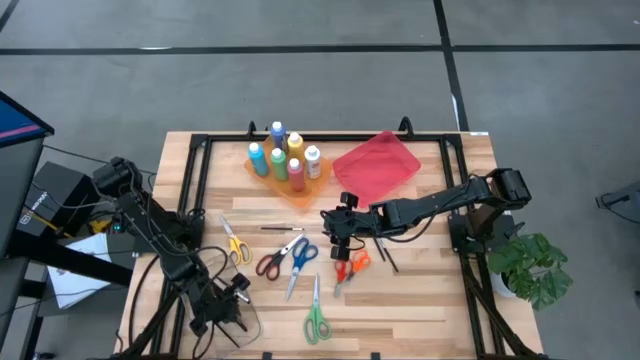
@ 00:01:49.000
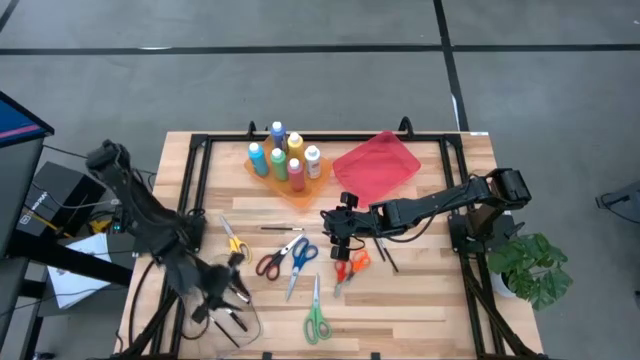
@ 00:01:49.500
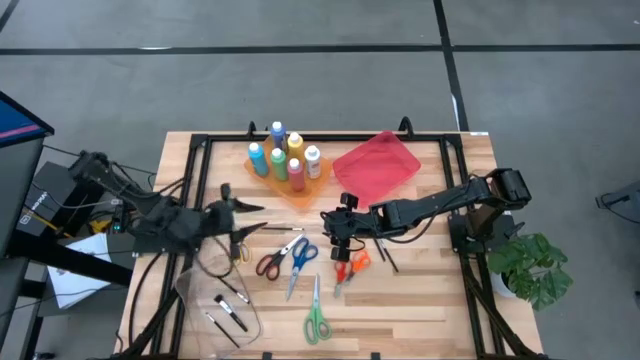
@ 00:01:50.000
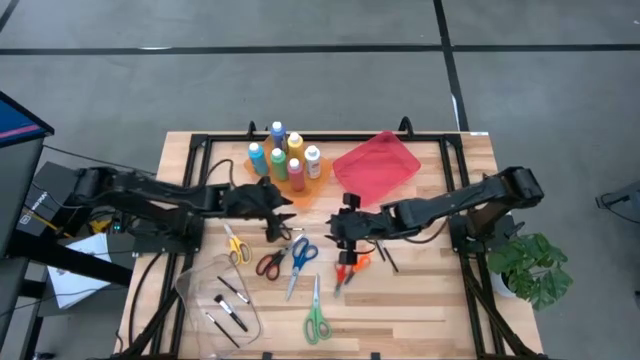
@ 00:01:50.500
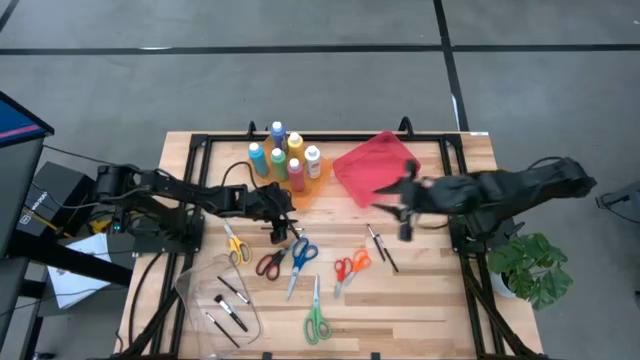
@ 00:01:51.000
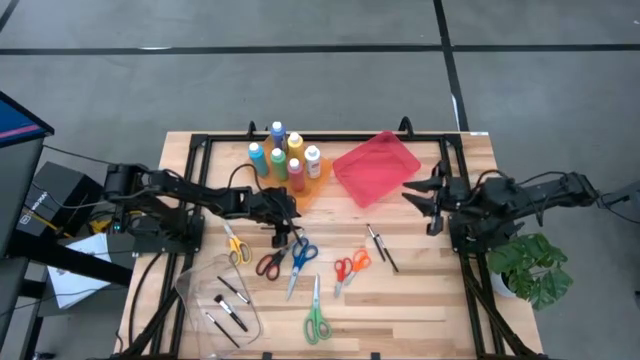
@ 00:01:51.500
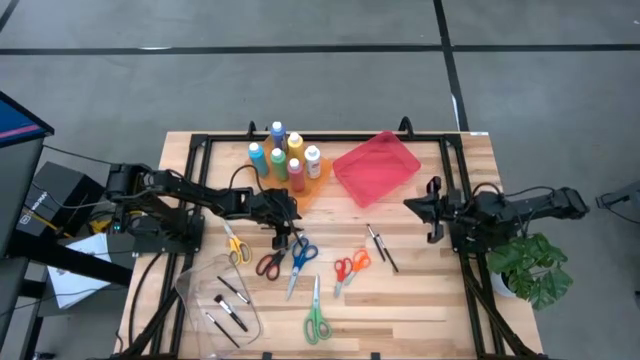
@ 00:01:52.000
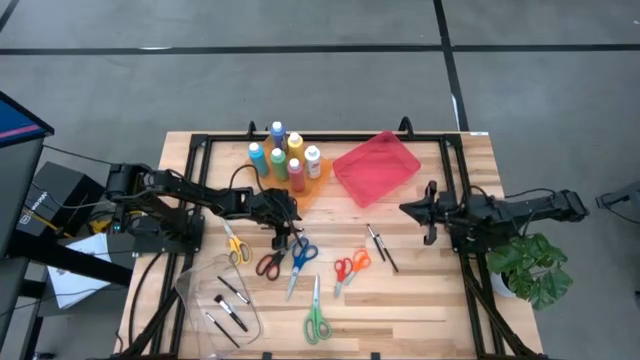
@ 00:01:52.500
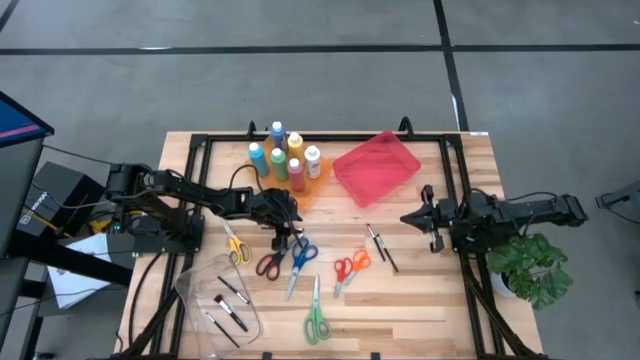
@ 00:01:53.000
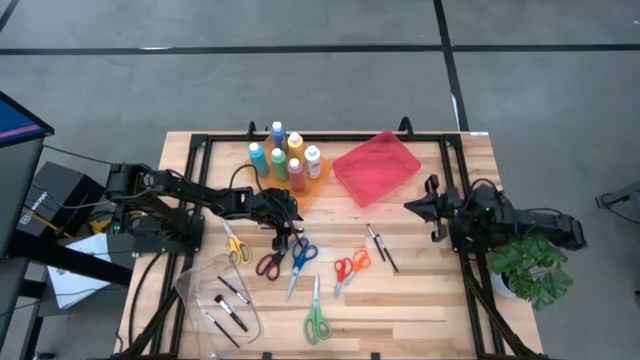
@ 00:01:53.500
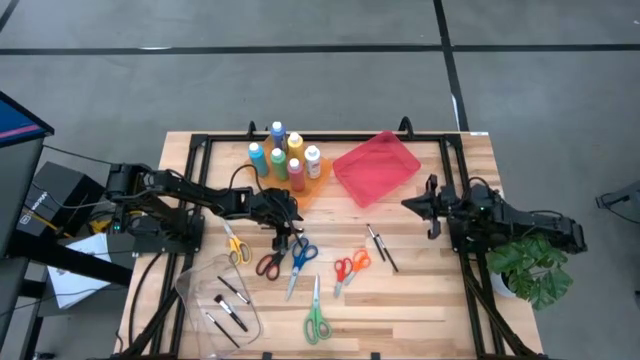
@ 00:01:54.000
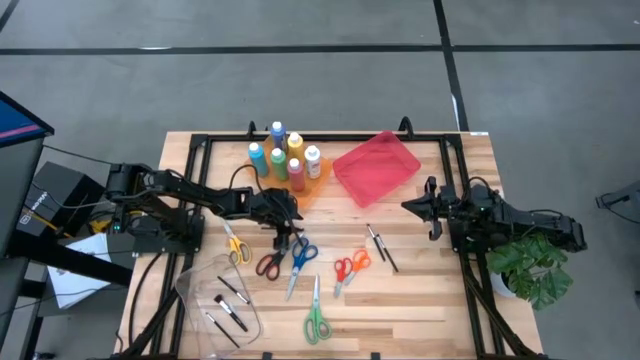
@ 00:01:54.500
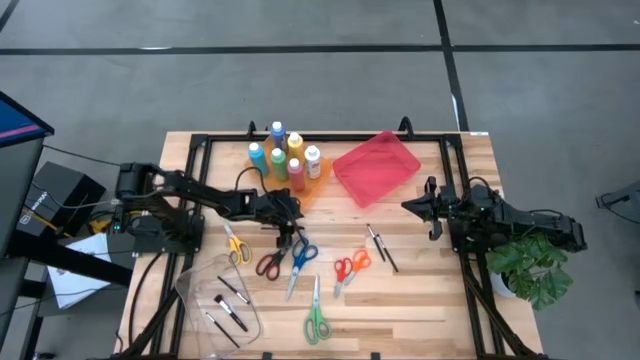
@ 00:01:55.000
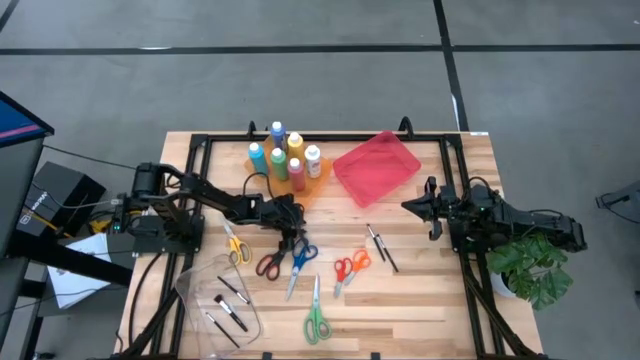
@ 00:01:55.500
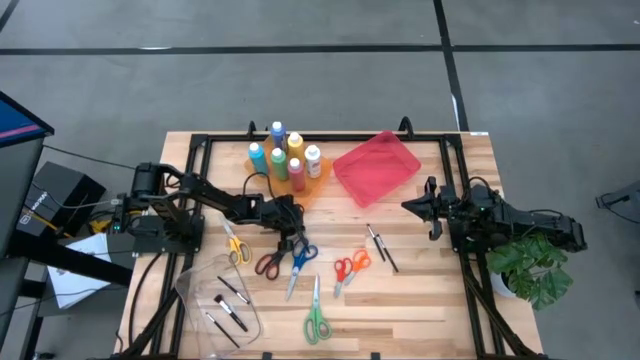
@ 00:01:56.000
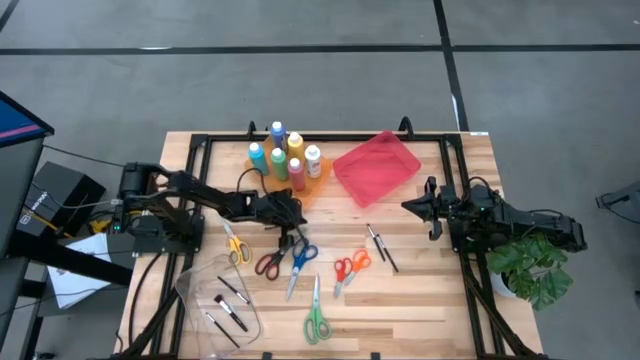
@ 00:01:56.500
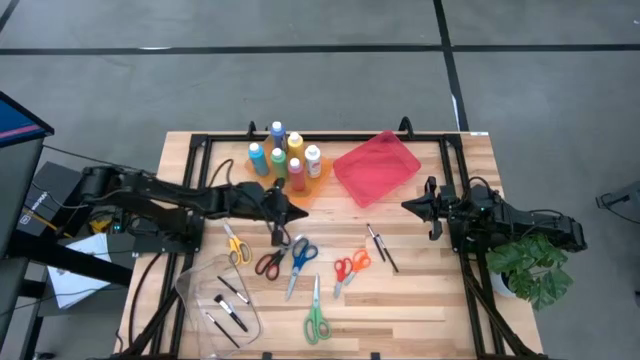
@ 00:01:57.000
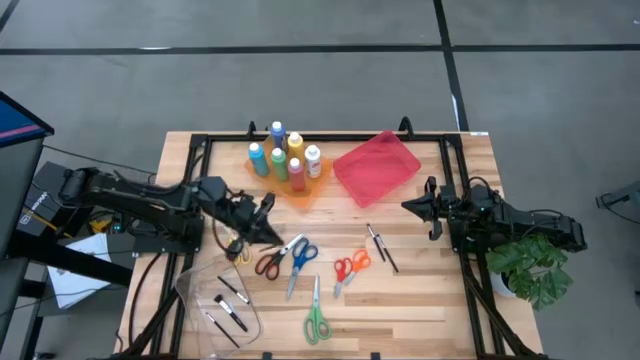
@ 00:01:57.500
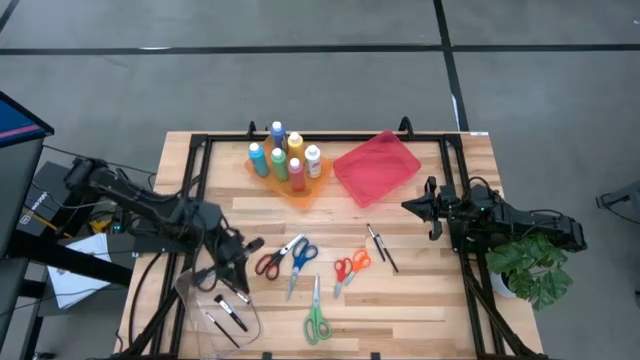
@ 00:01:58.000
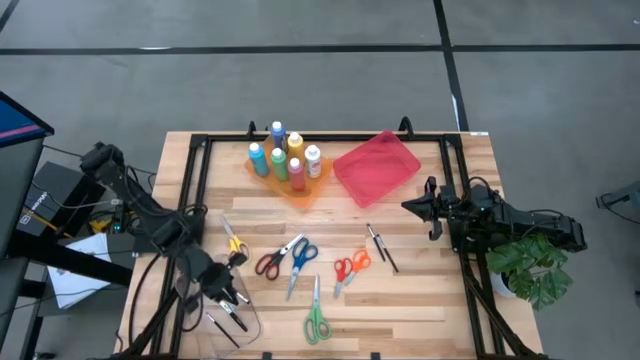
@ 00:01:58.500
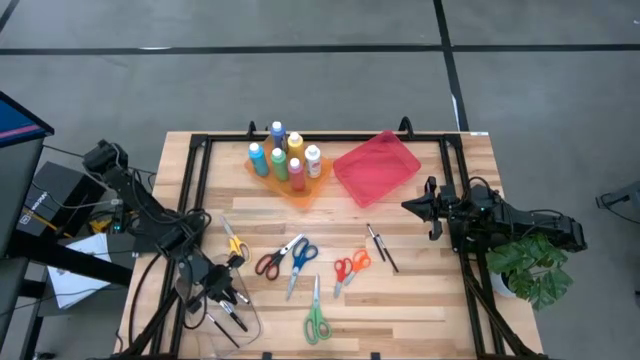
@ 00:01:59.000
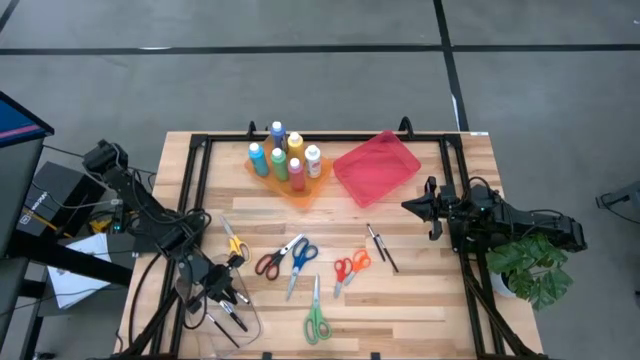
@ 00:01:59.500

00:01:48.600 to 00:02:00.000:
Task: Pick & Place Paint Supplies
Put the makeup brush into the transparent bin

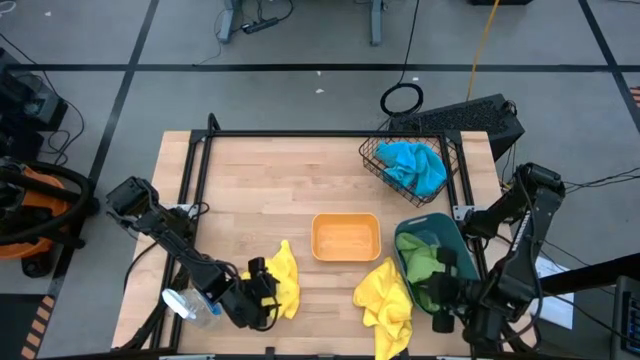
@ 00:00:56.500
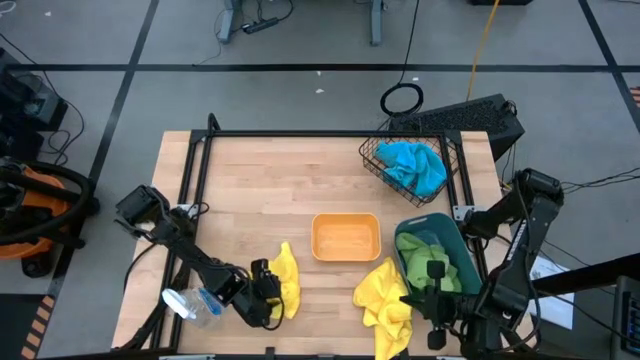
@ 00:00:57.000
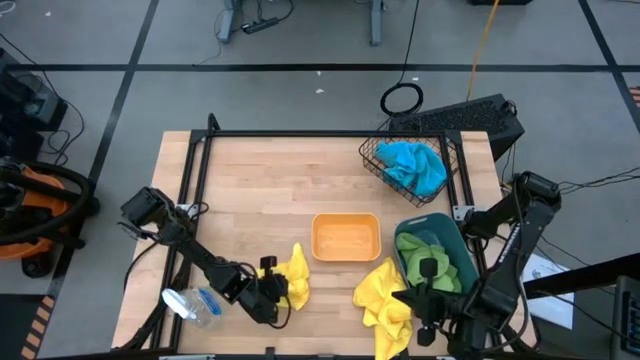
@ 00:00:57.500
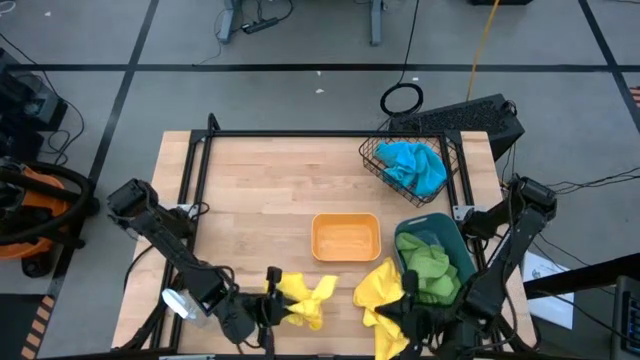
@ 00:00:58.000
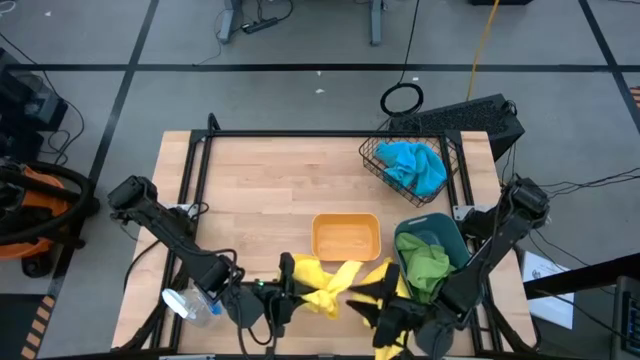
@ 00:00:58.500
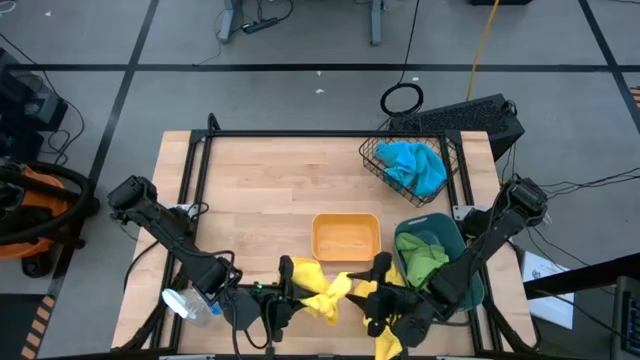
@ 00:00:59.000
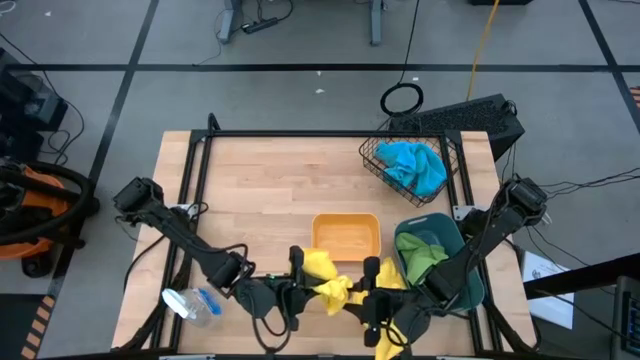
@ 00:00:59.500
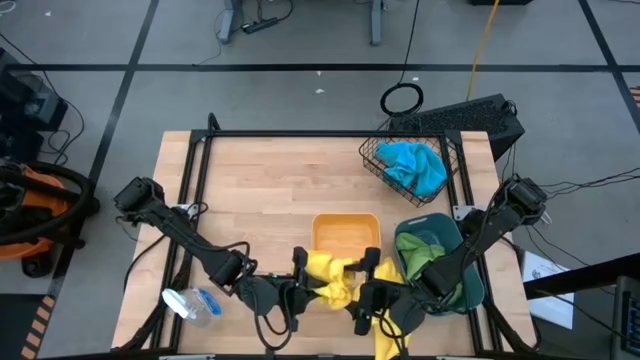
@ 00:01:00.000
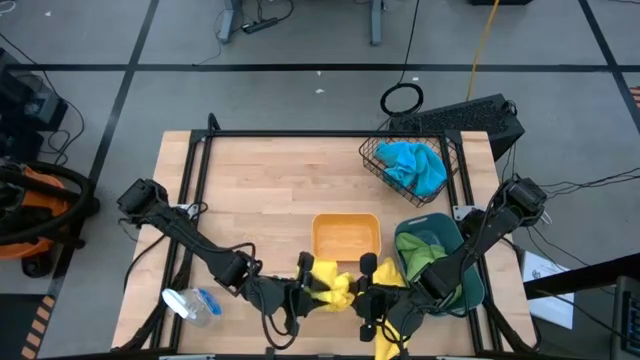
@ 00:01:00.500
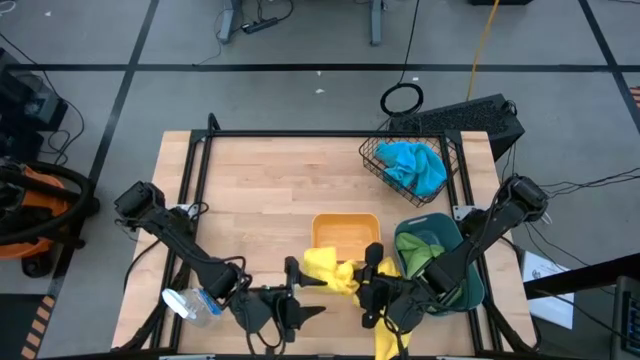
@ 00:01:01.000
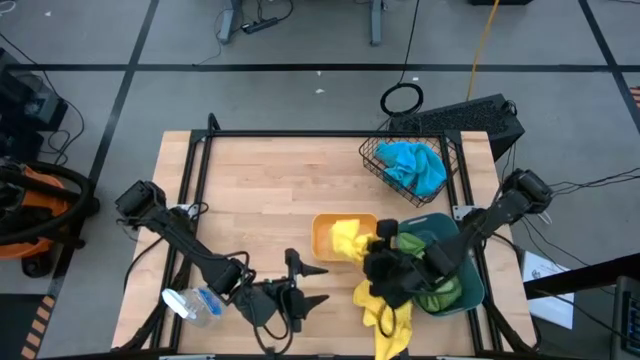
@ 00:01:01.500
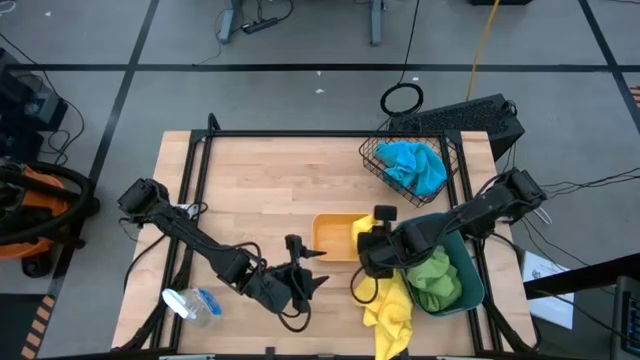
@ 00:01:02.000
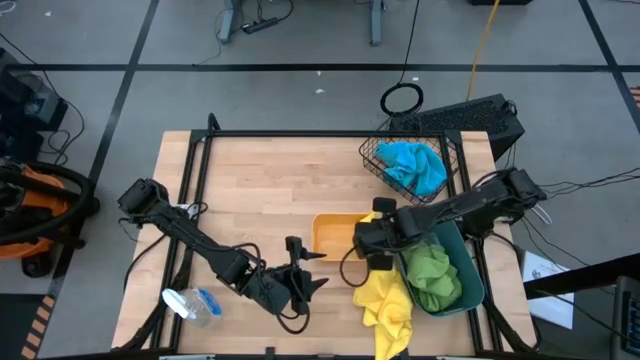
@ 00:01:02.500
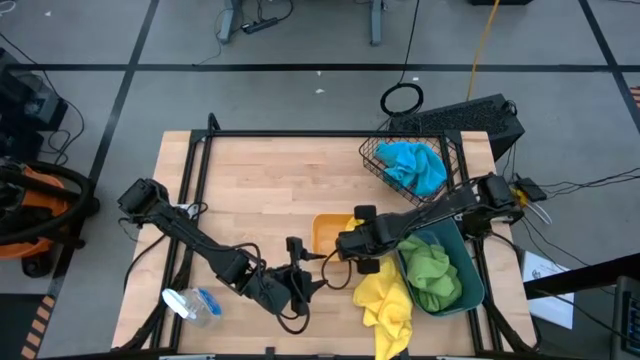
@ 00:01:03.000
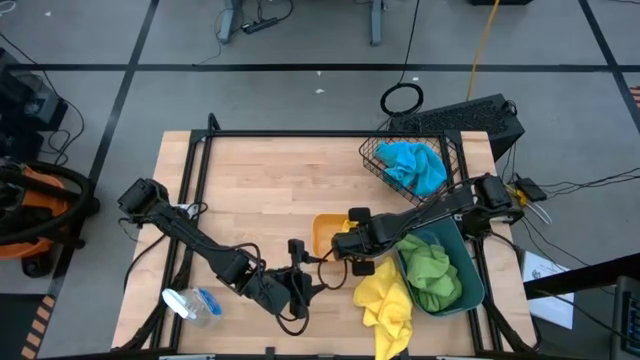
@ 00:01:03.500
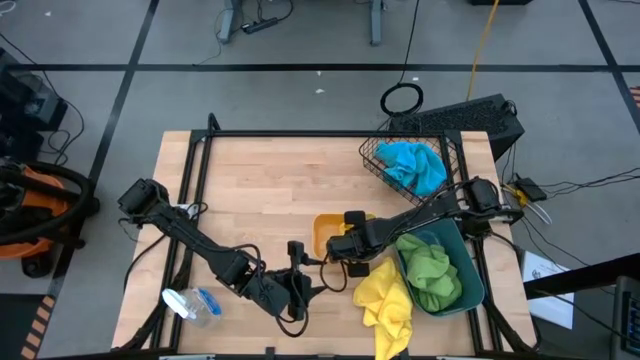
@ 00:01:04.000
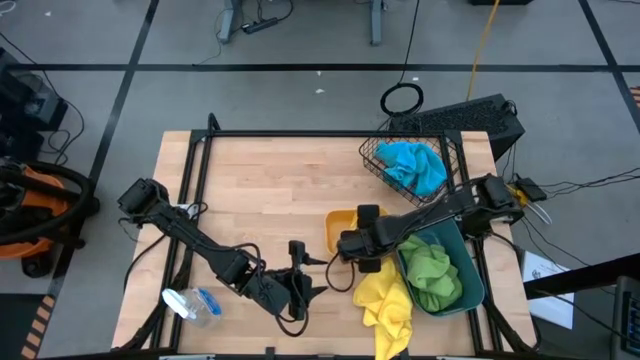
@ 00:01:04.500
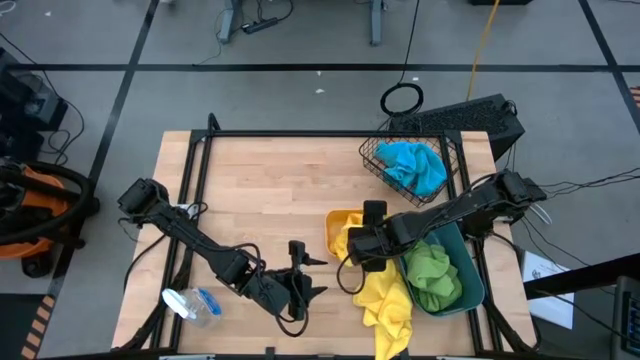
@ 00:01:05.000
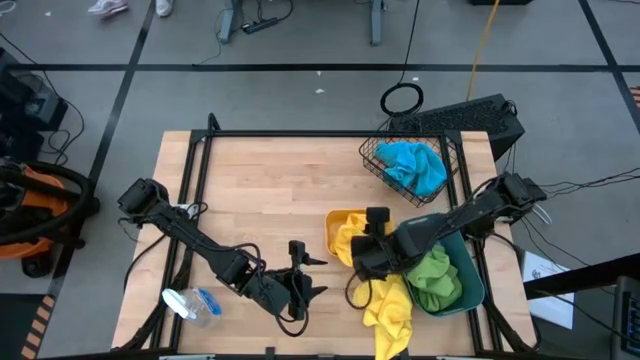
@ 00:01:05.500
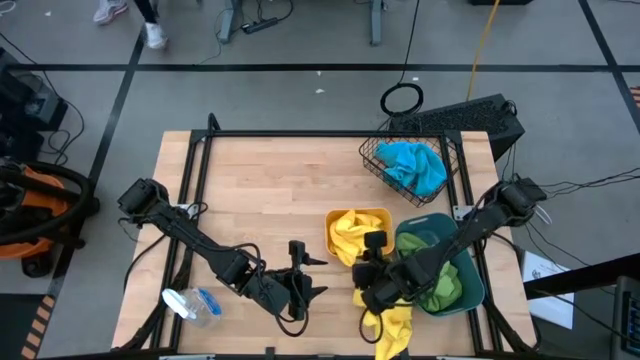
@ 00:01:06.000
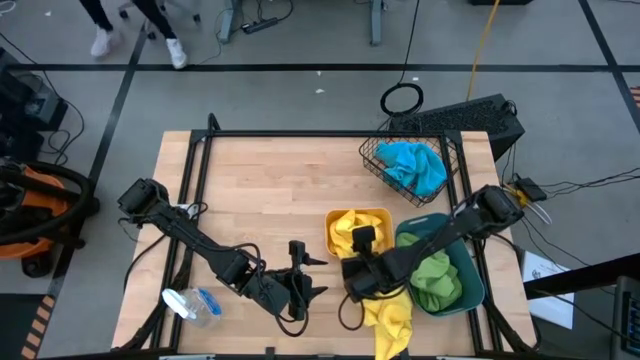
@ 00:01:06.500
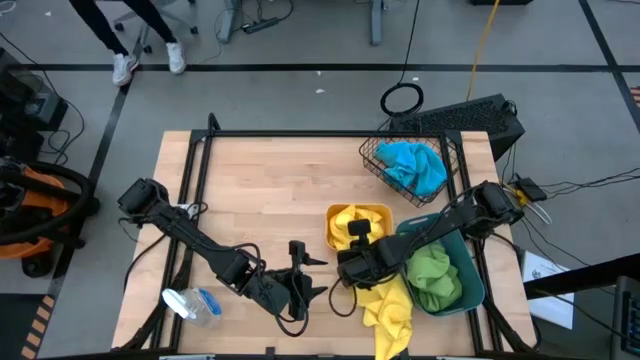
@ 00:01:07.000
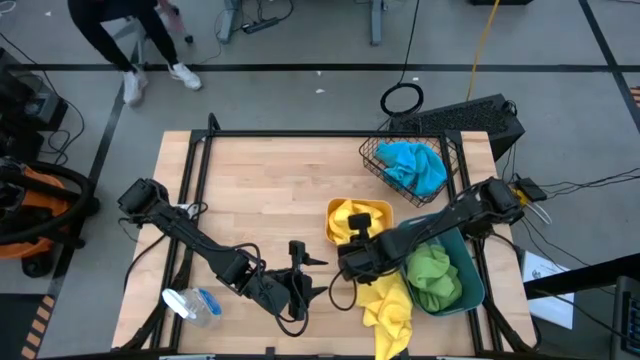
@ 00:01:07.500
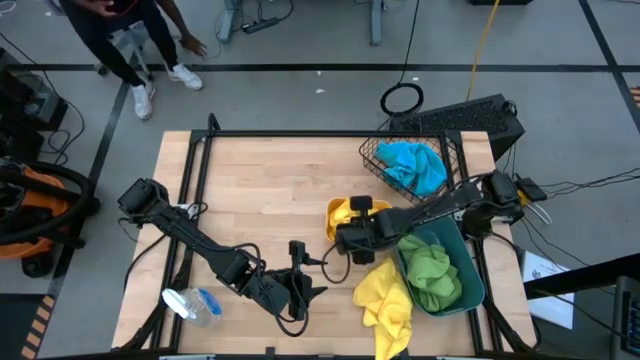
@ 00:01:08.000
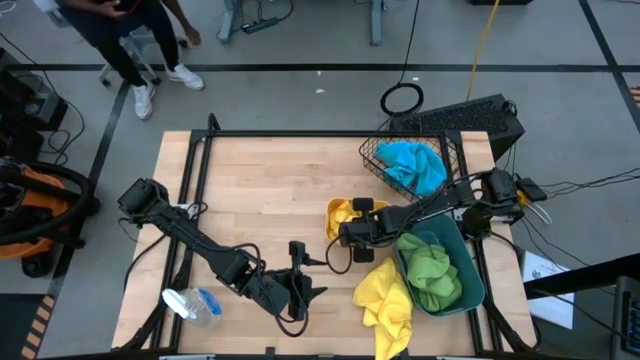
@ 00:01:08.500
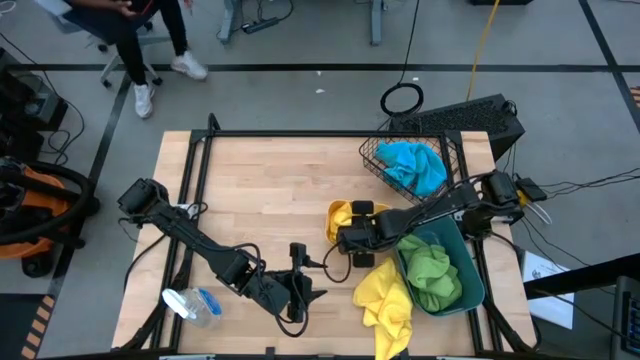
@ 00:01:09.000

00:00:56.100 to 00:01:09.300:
Task: Sort microfiber towel by color & place in baskets
Put the left yellow microfiber cloth into the orange bin
